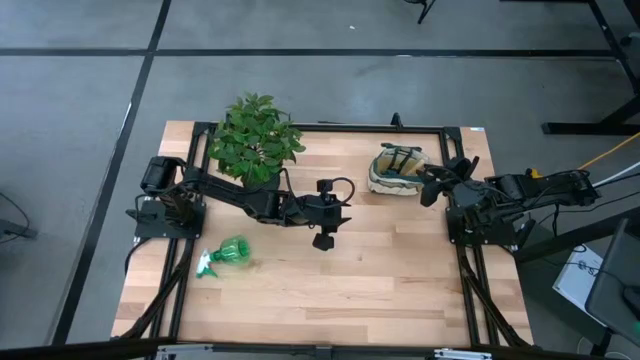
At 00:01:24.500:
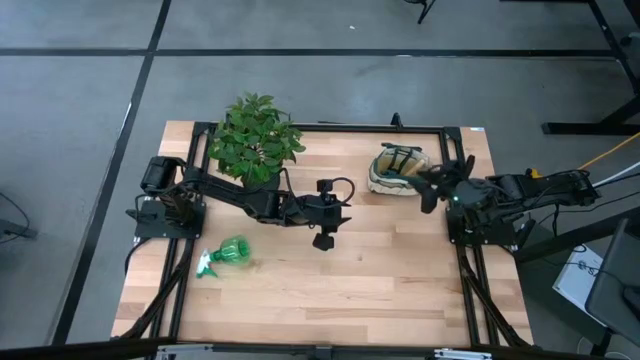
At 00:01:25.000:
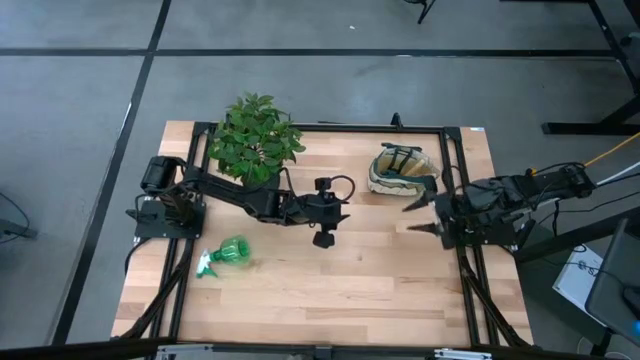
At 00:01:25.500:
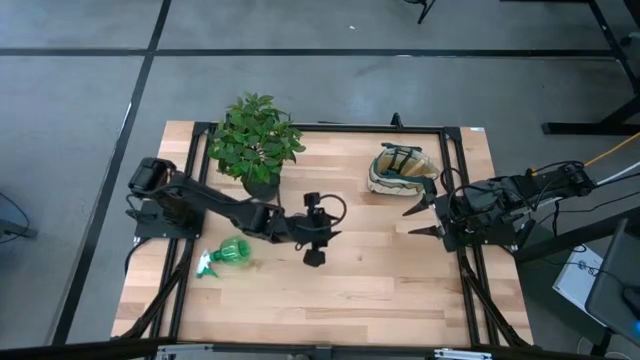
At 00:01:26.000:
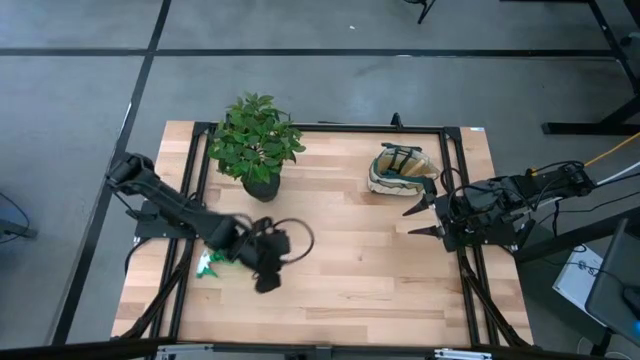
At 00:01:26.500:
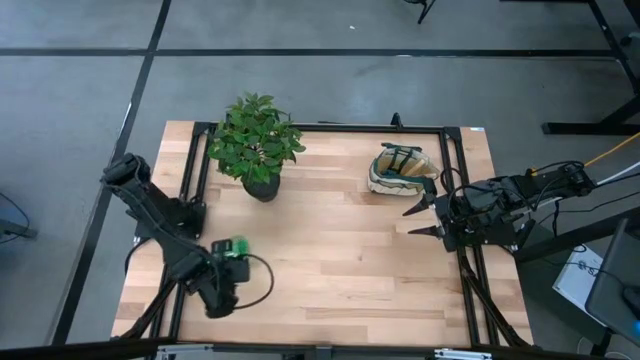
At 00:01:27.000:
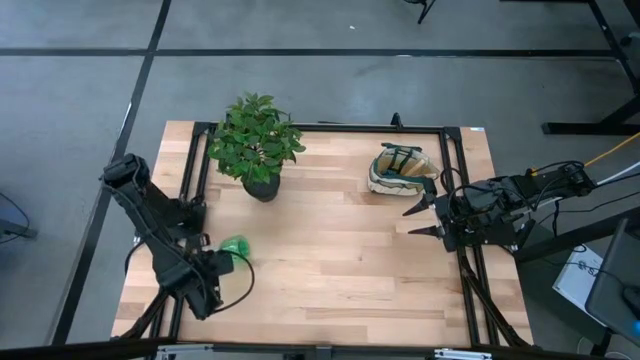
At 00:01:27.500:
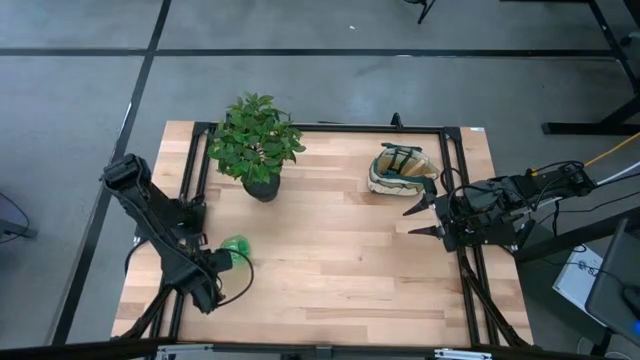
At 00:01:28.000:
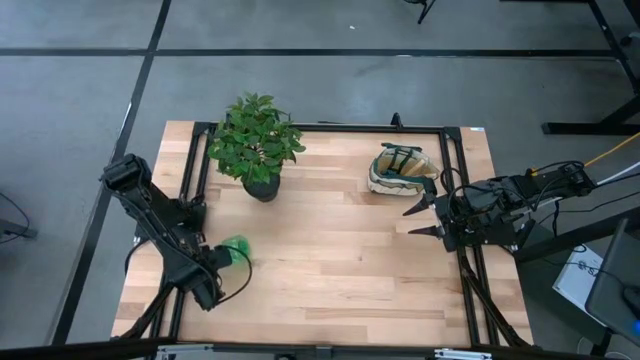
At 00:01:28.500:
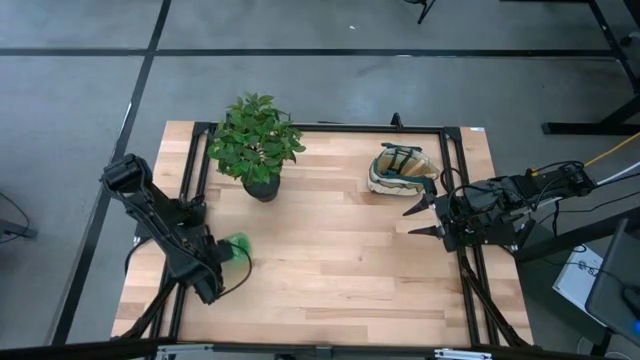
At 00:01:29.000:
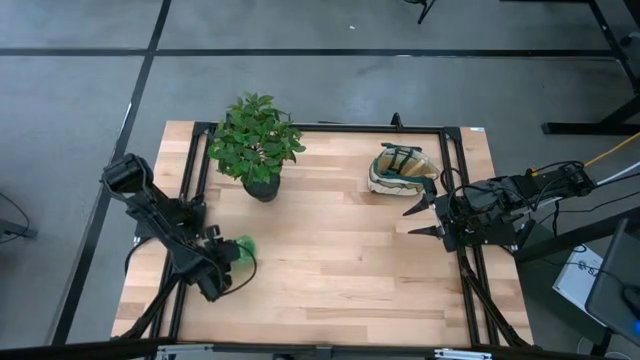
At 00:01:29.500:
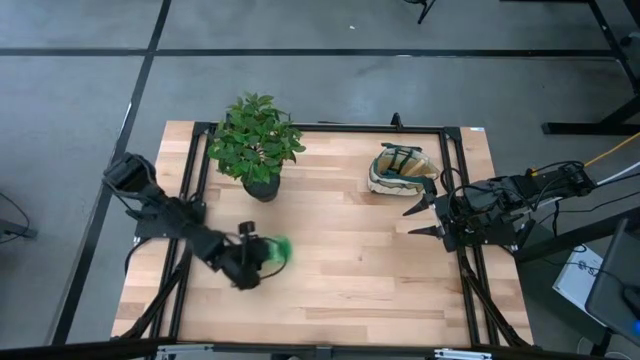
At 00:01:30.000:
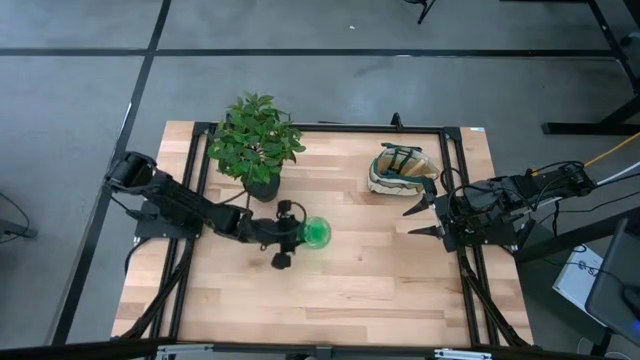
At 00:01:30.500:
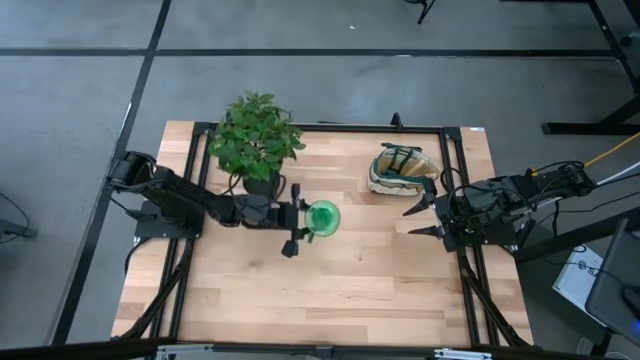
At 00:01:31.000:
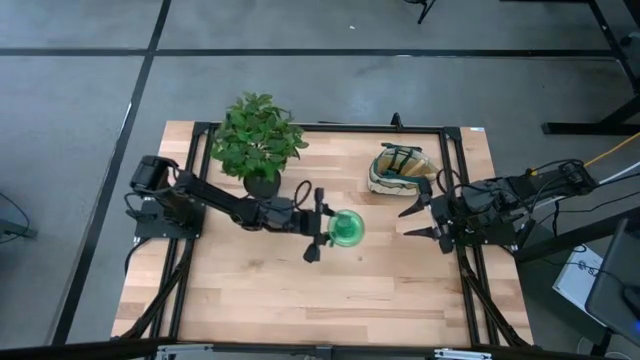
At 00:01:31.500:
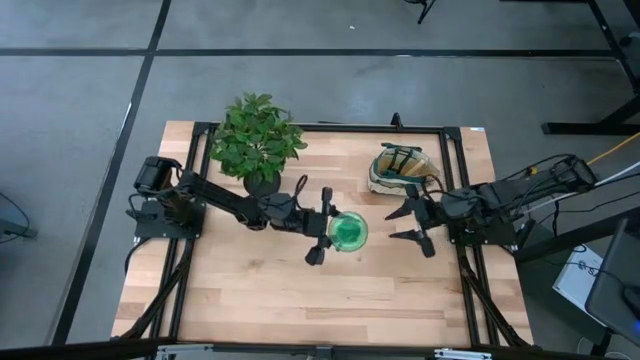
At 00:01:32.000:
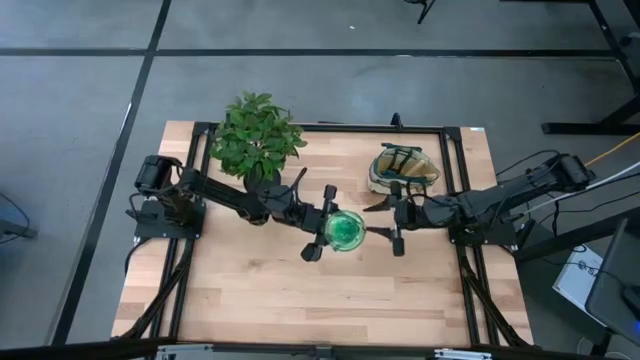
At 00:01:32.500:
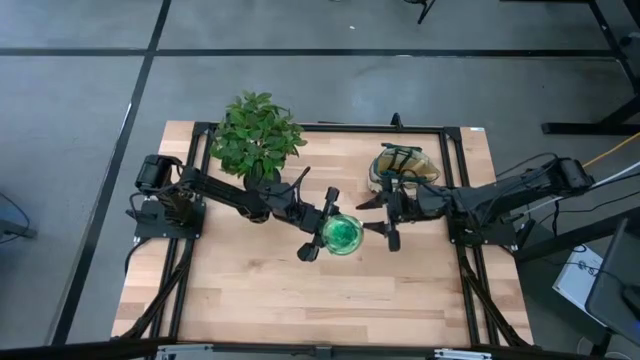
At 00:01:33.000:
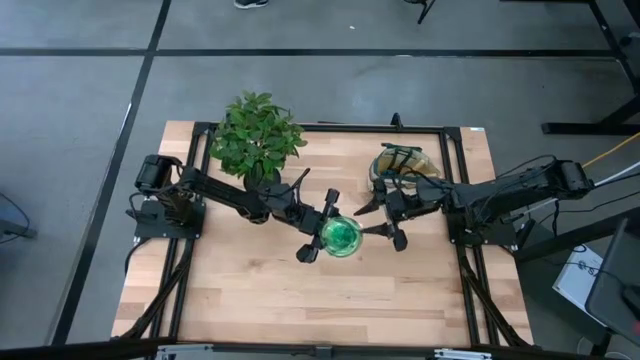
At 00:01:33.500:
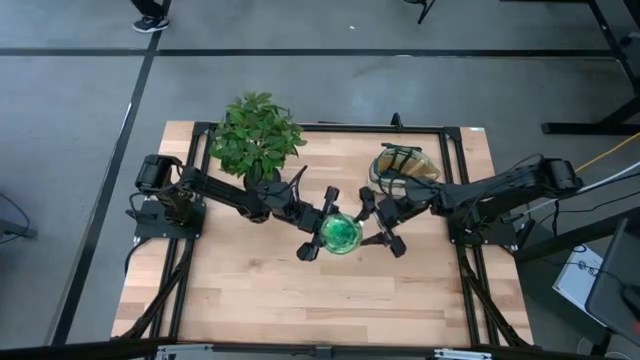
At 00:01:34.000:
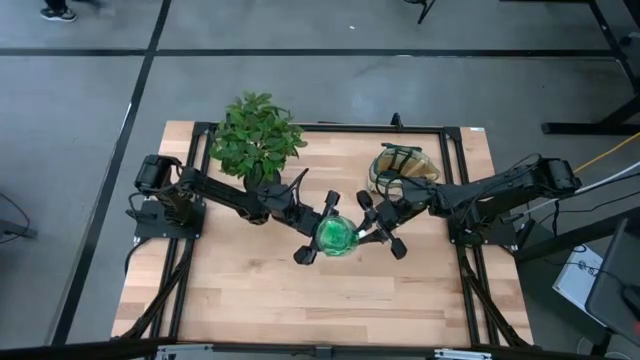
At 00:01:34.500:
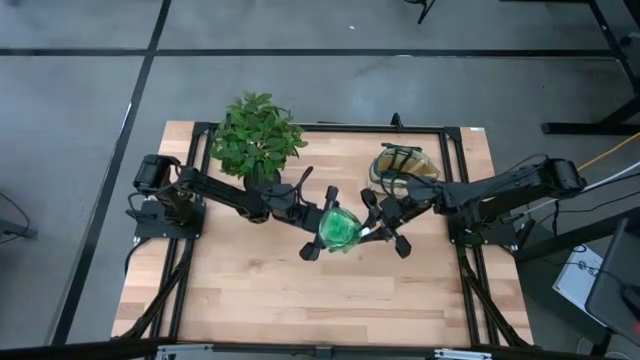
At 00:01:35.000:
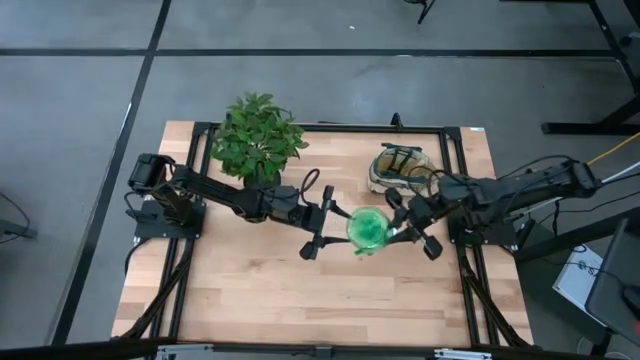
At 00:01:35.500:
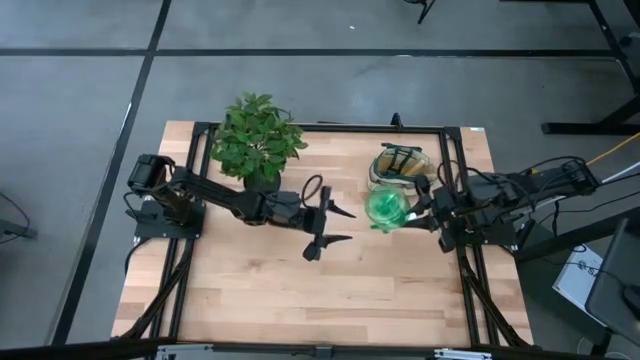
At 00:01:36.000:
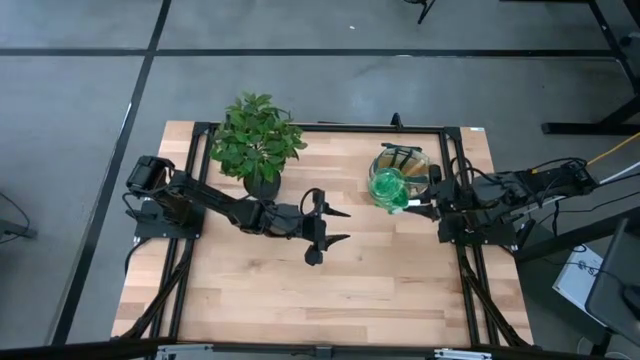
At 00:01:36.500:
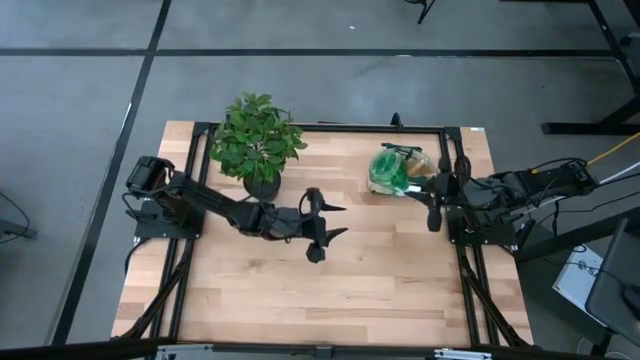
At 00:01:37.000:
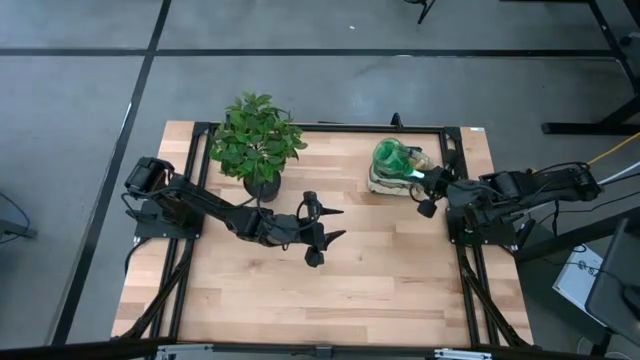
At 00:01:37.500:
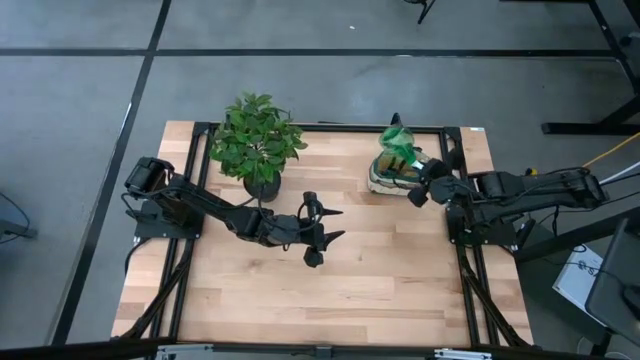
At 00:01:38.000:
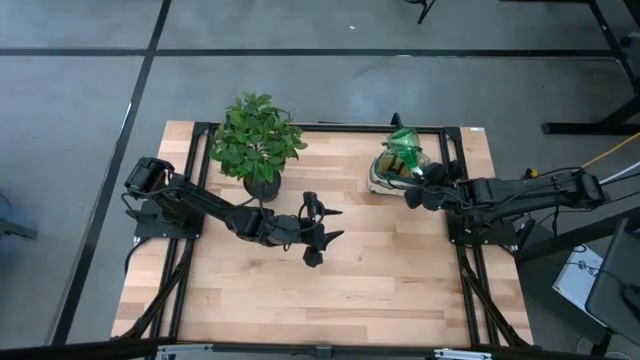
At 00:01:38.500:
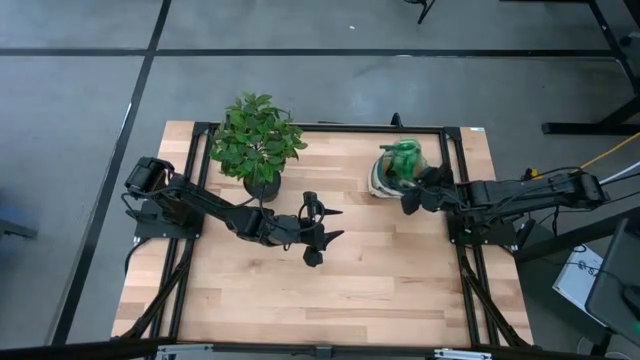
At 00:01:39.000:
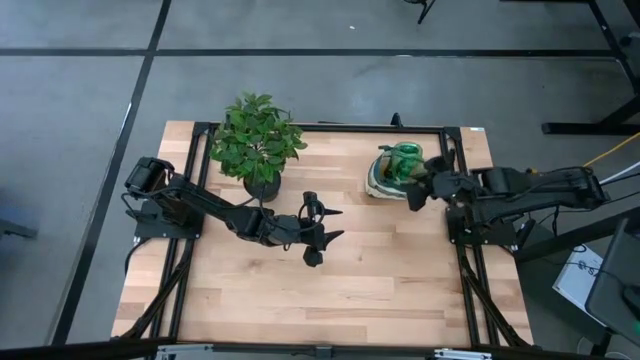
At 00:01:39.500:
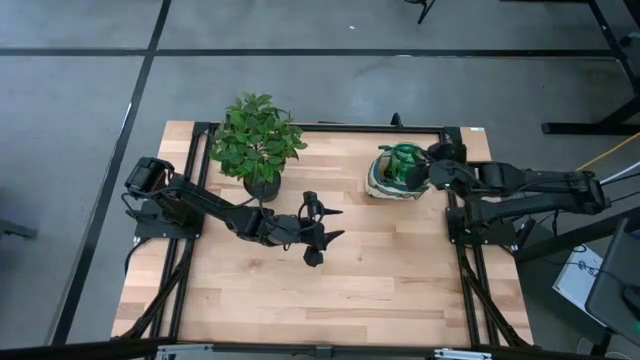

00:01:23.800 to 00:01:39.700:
Task: Pick & Place Garden tools in Gardening bag
Put the green spray bottle into the white gardening bag

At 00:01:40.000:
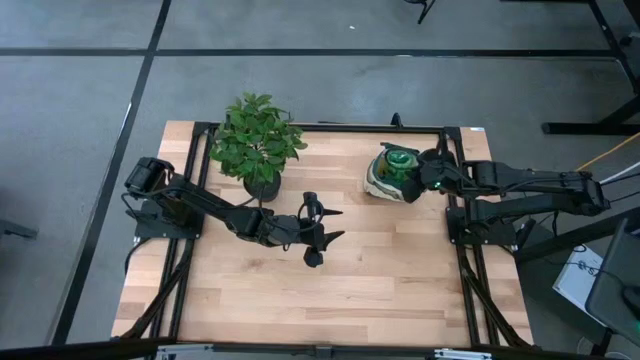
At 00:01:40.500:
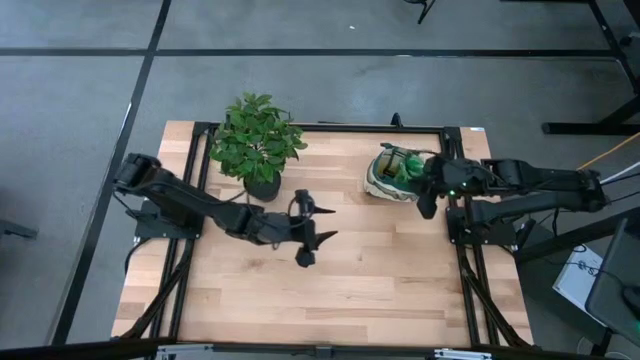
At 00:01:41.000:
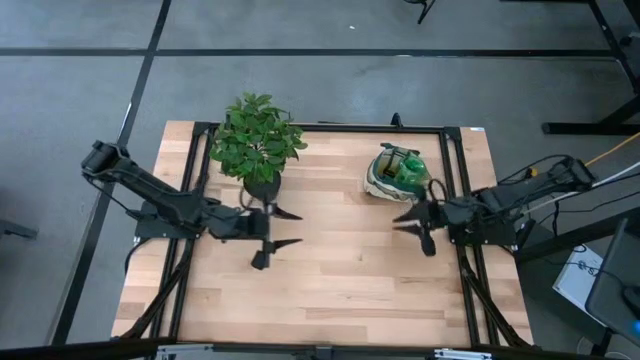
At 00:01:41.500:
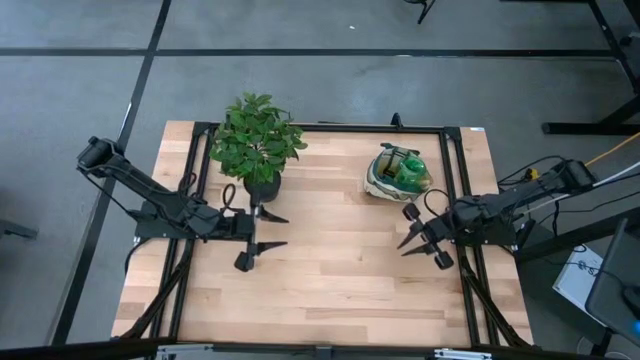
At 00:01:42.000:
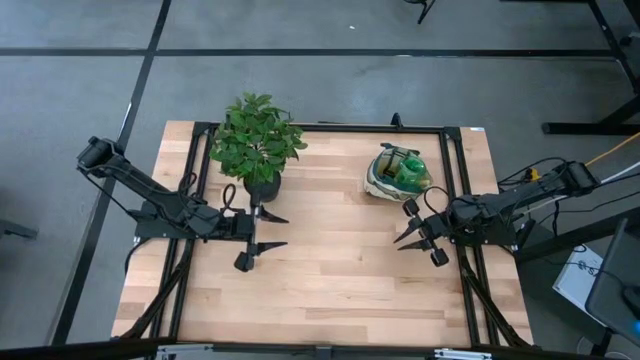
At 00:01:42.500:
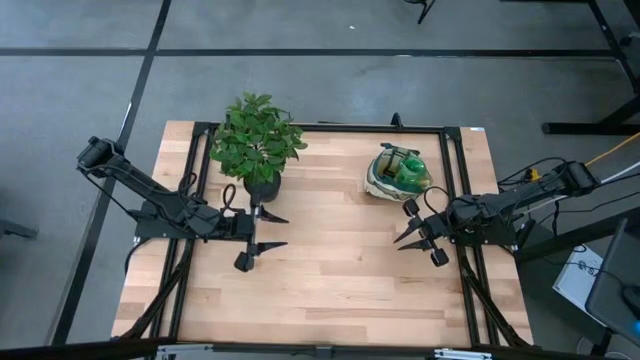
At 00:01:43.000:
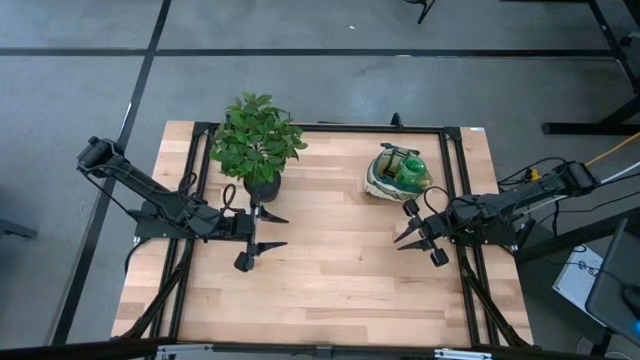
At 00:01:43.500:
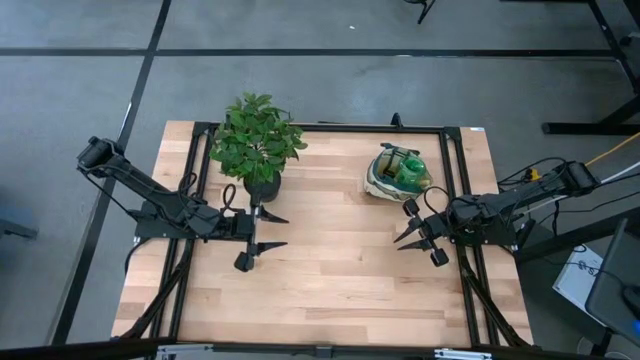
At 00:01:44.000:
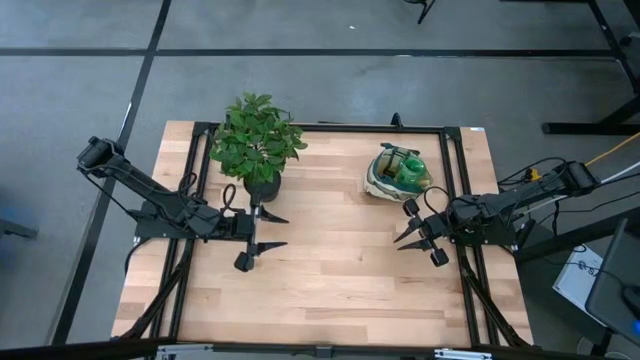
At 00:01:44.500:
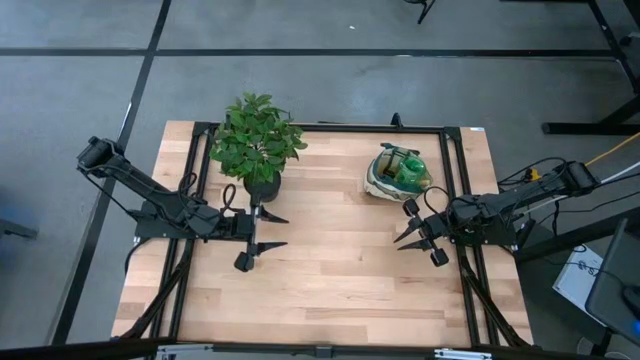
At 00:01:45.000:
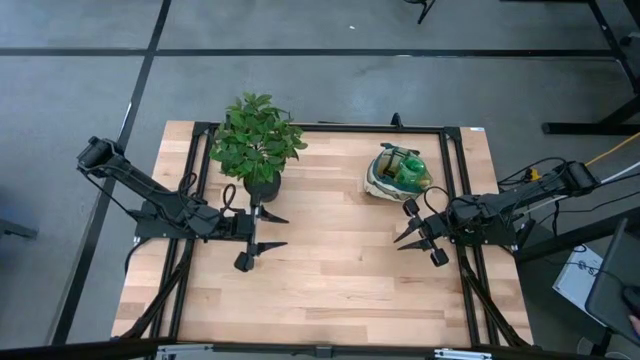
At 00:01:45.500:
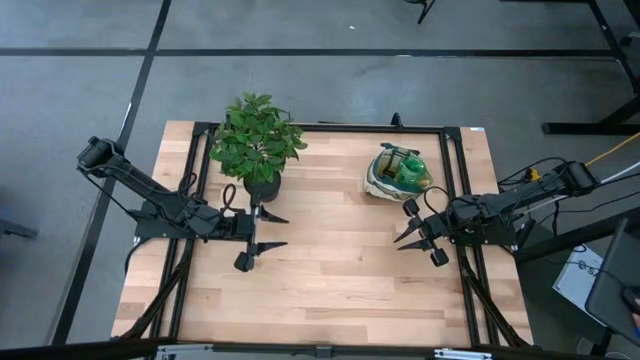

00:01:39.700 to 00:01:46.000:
Return to Home Position
